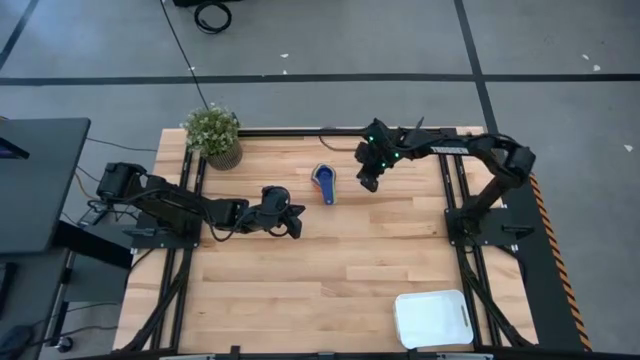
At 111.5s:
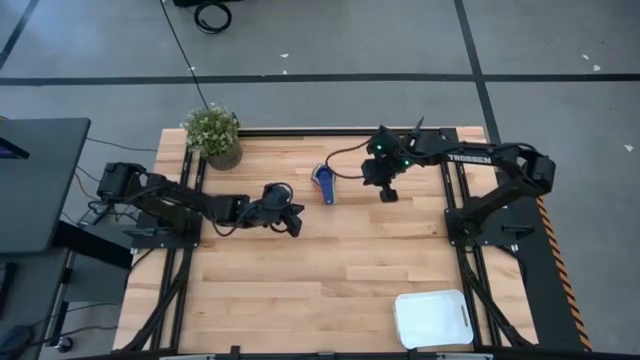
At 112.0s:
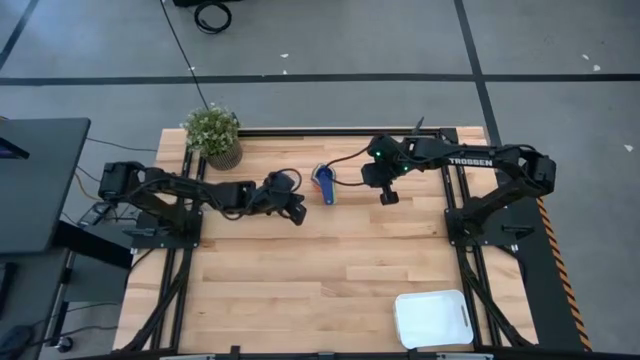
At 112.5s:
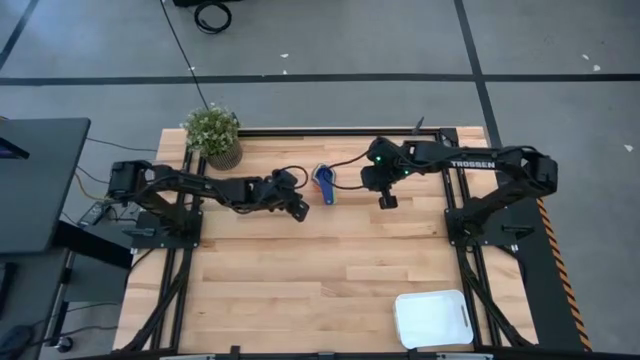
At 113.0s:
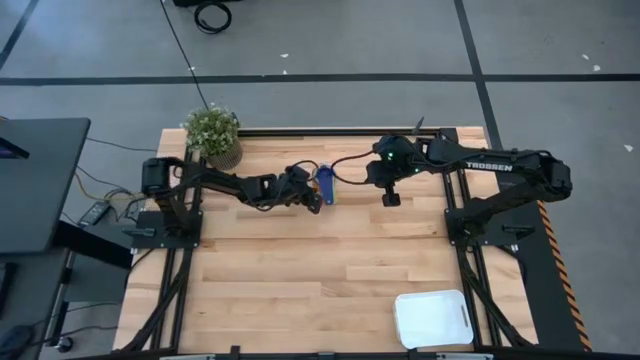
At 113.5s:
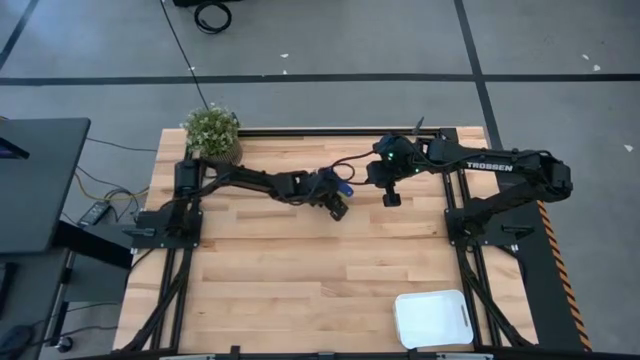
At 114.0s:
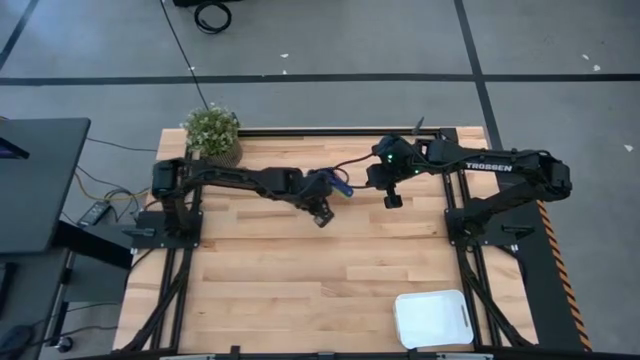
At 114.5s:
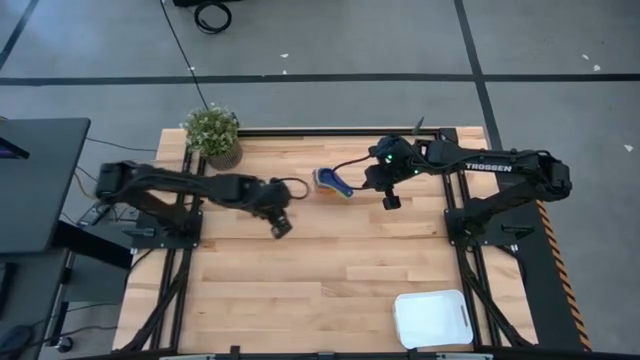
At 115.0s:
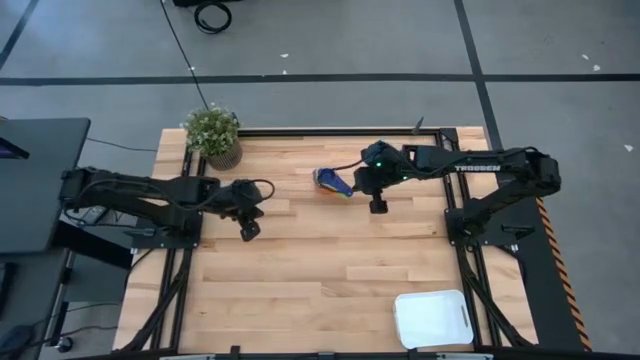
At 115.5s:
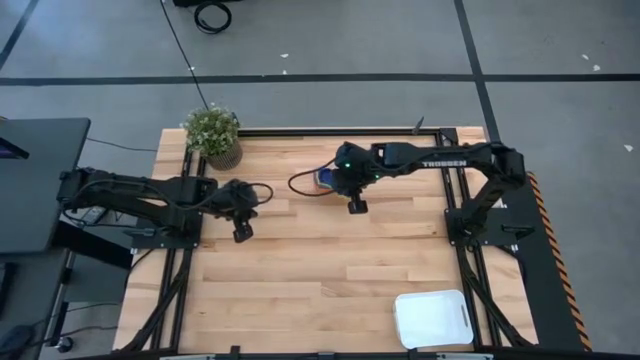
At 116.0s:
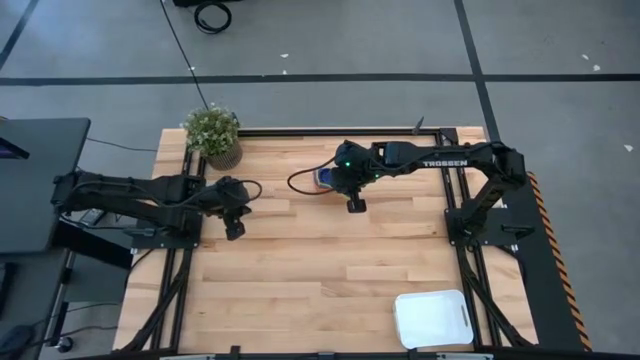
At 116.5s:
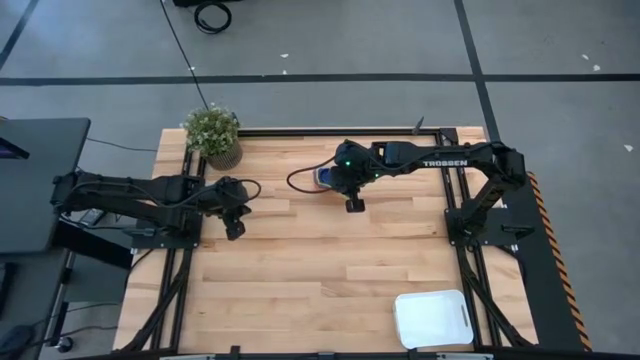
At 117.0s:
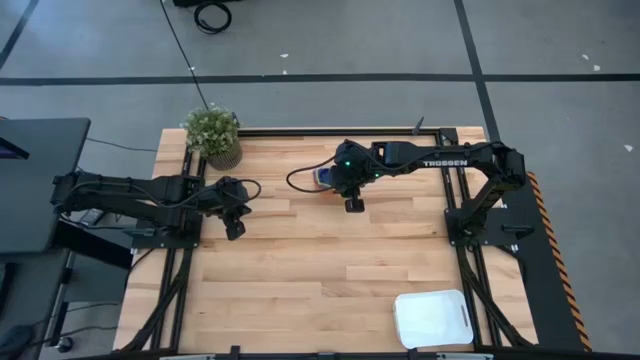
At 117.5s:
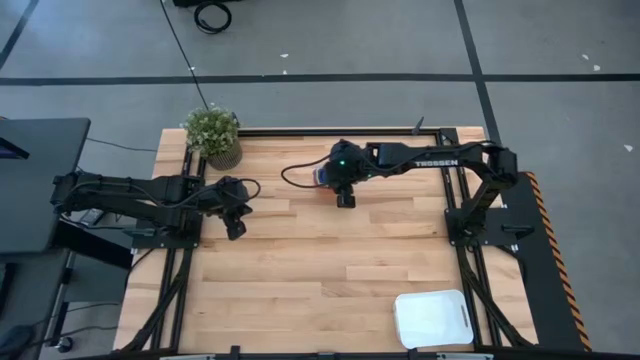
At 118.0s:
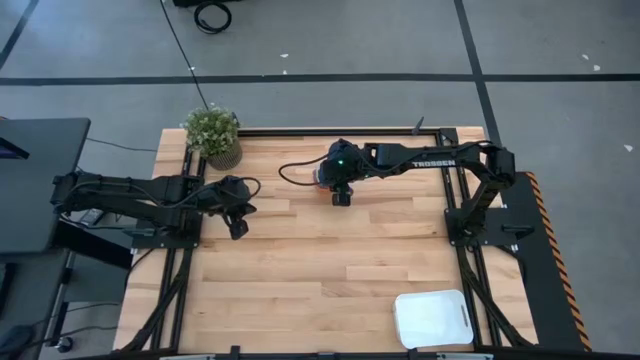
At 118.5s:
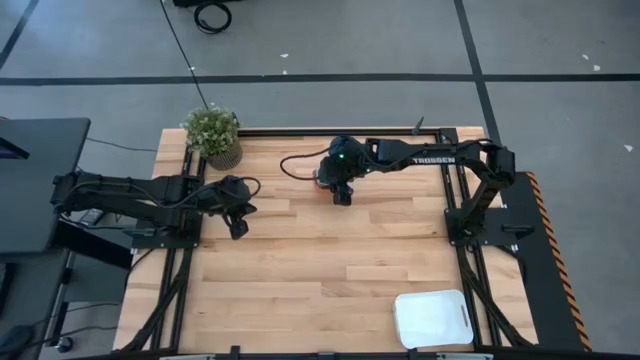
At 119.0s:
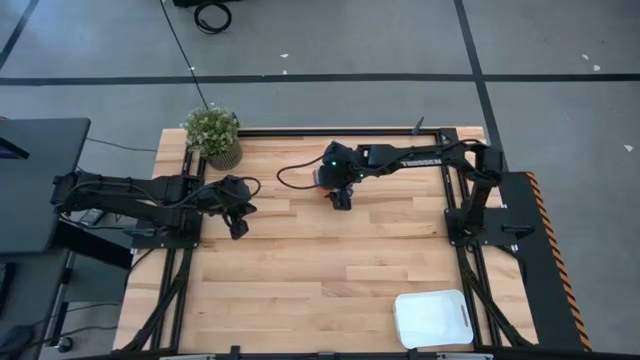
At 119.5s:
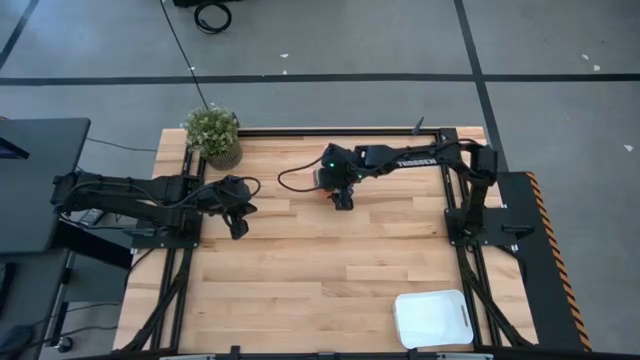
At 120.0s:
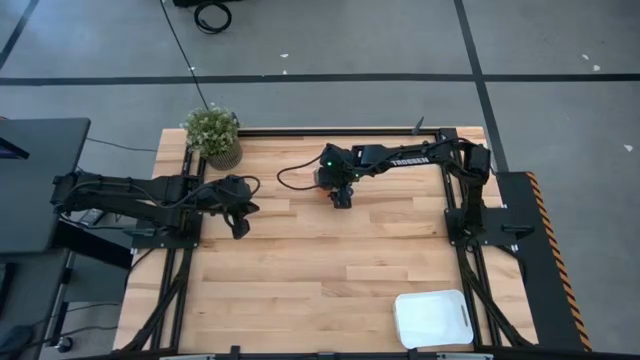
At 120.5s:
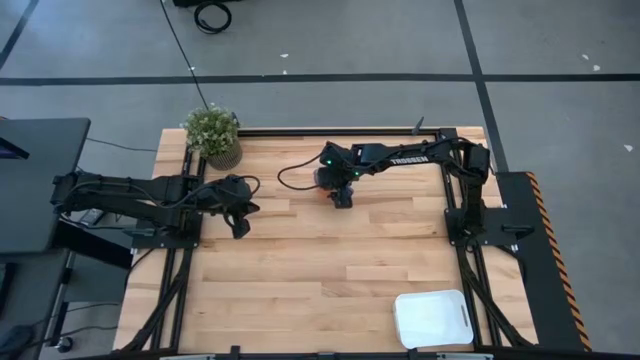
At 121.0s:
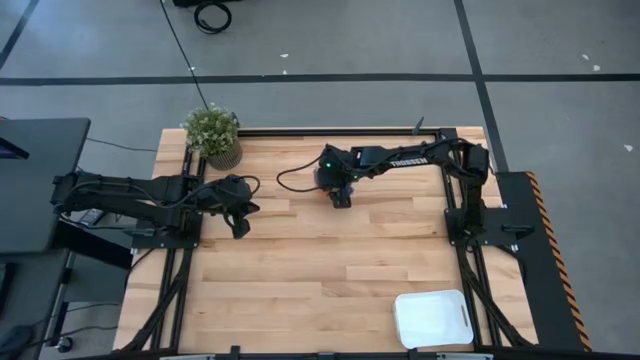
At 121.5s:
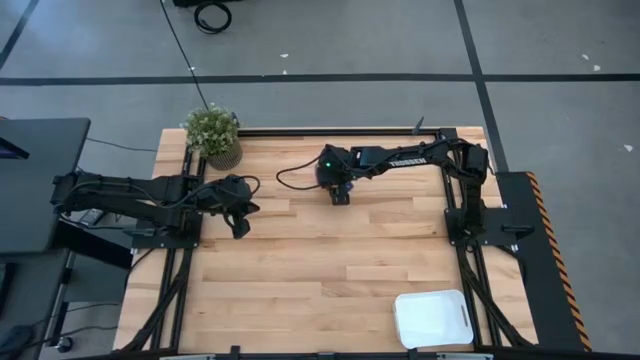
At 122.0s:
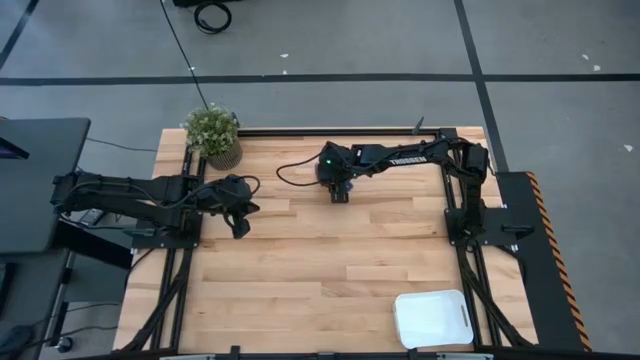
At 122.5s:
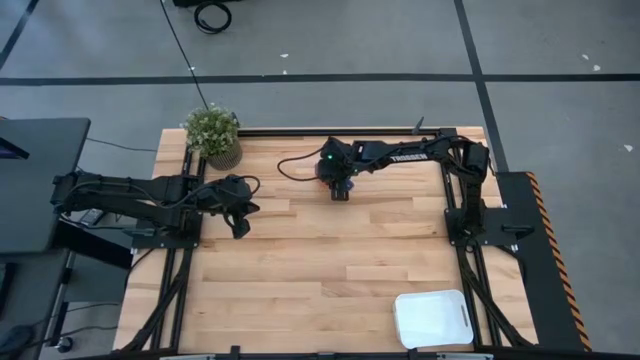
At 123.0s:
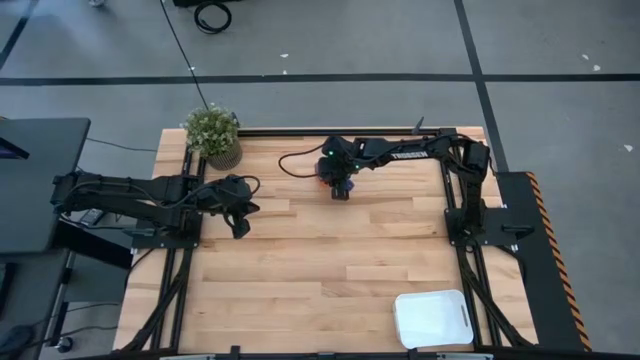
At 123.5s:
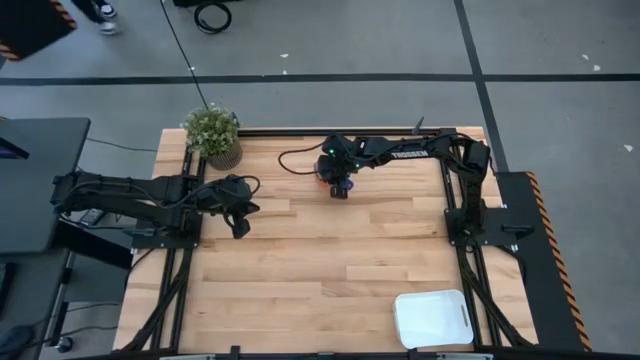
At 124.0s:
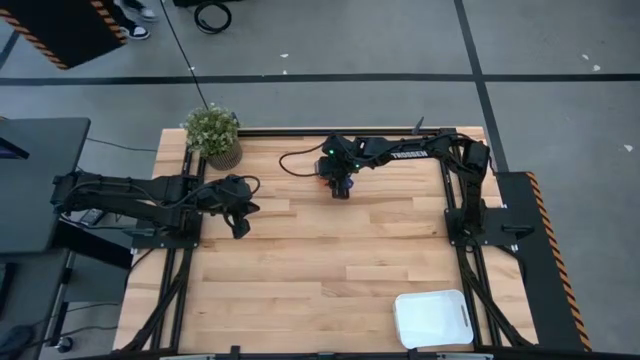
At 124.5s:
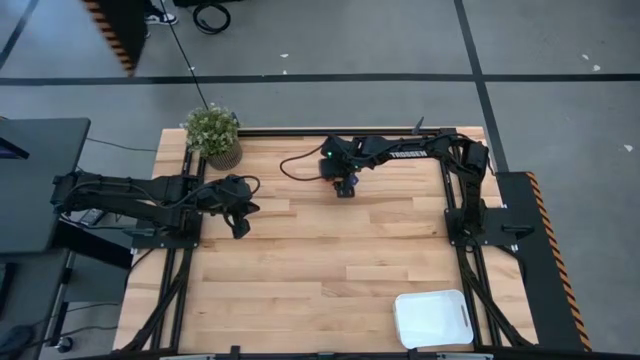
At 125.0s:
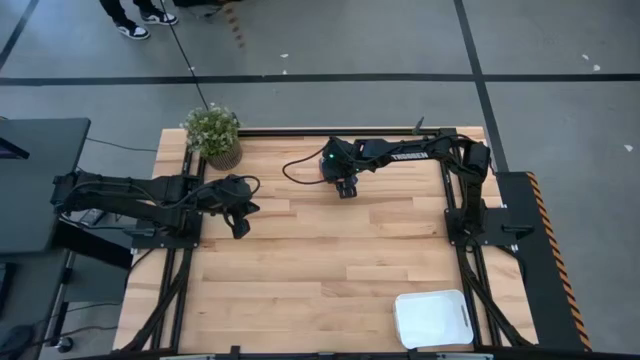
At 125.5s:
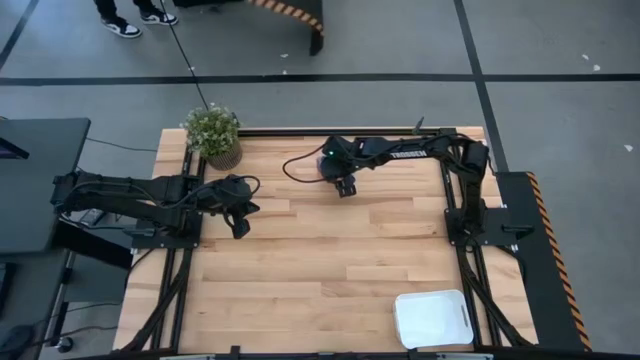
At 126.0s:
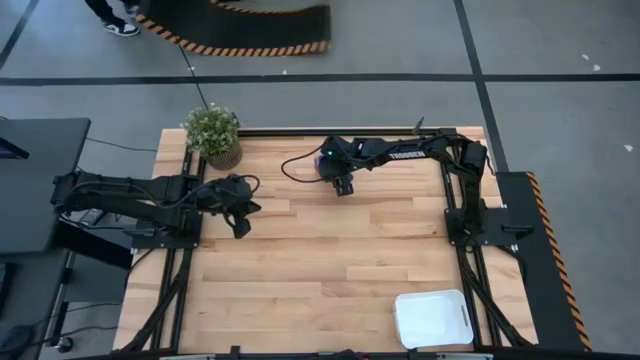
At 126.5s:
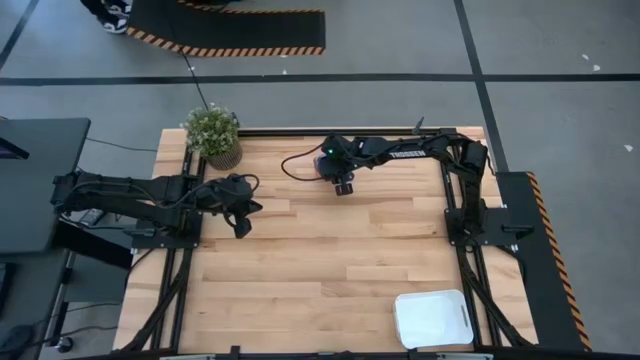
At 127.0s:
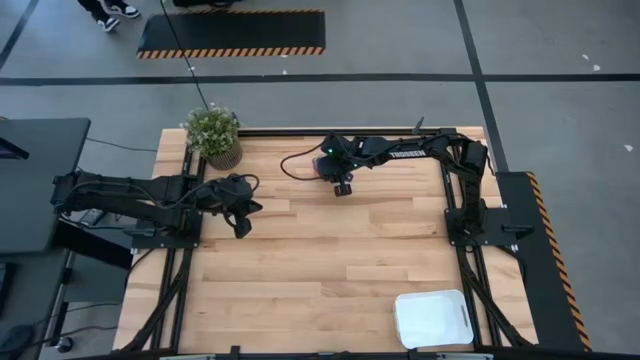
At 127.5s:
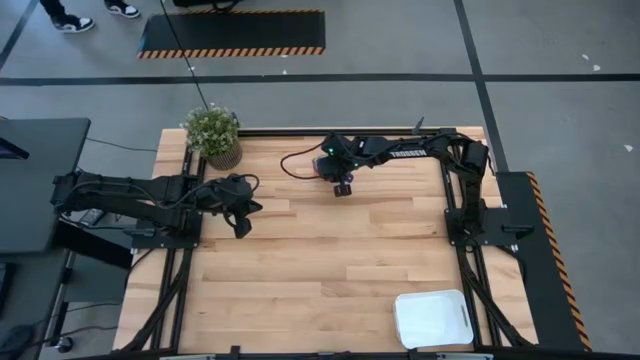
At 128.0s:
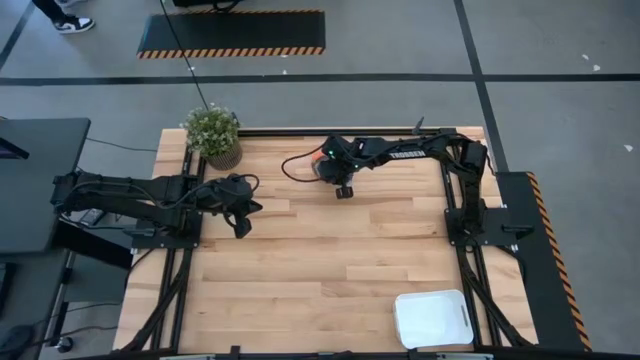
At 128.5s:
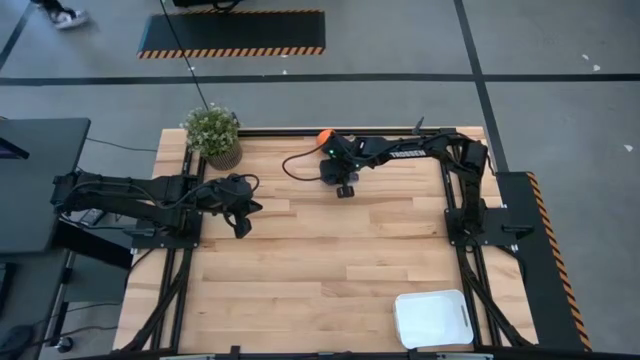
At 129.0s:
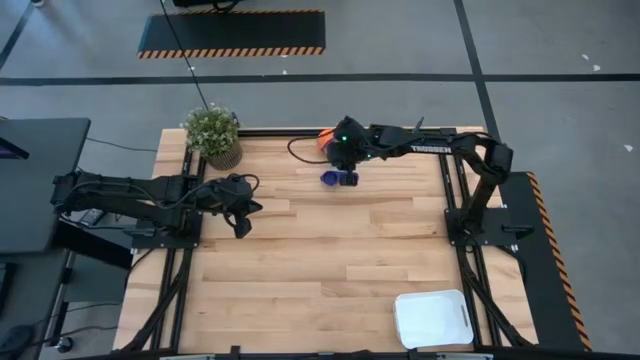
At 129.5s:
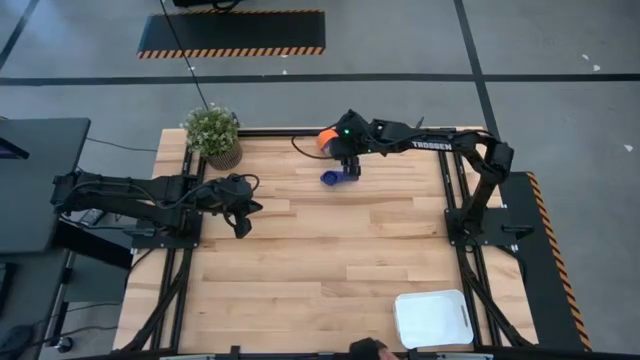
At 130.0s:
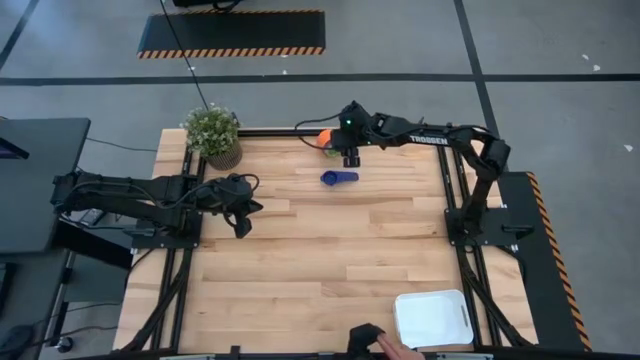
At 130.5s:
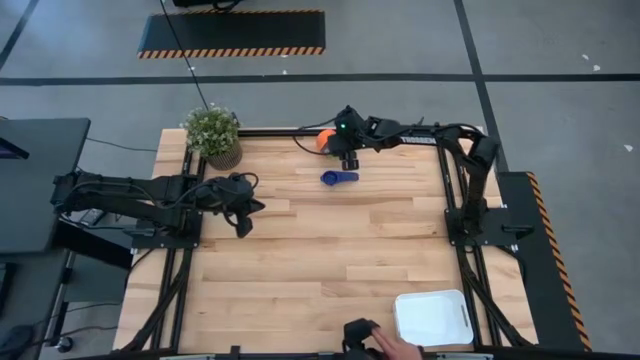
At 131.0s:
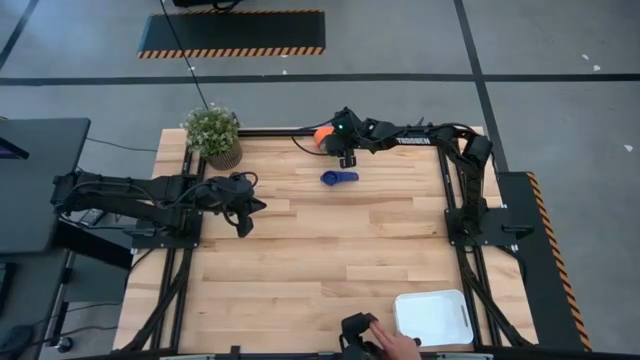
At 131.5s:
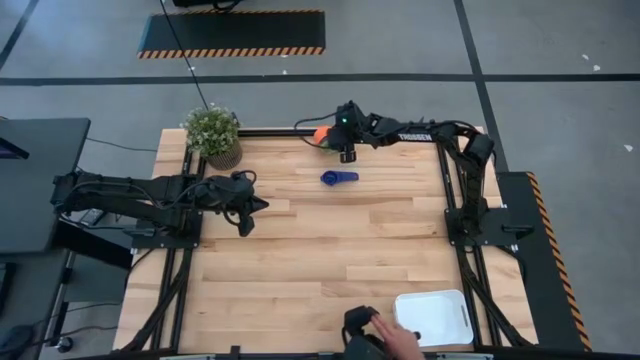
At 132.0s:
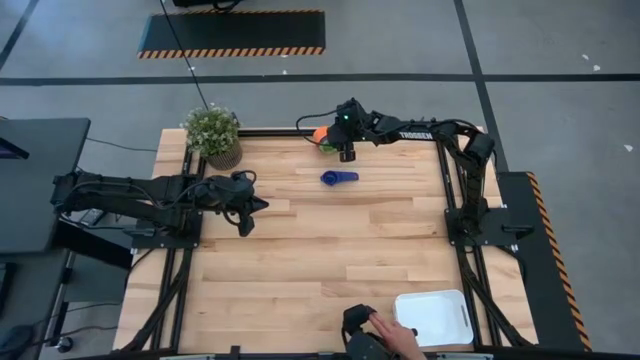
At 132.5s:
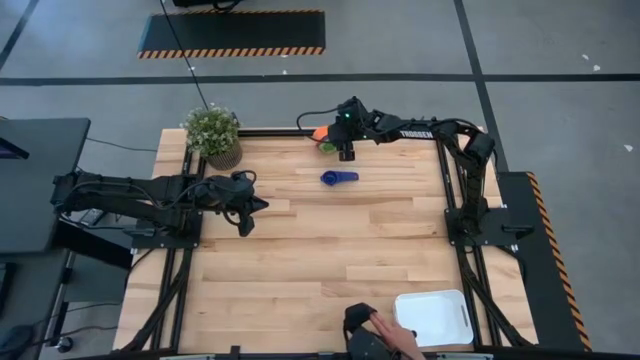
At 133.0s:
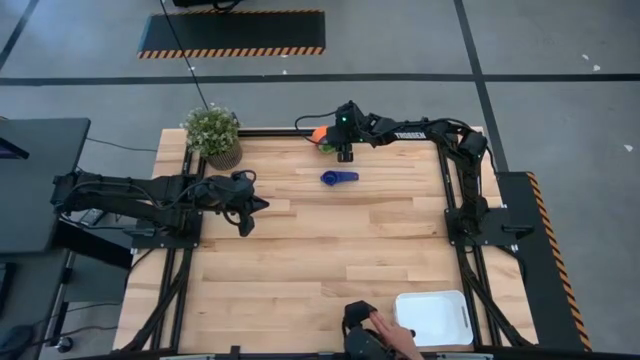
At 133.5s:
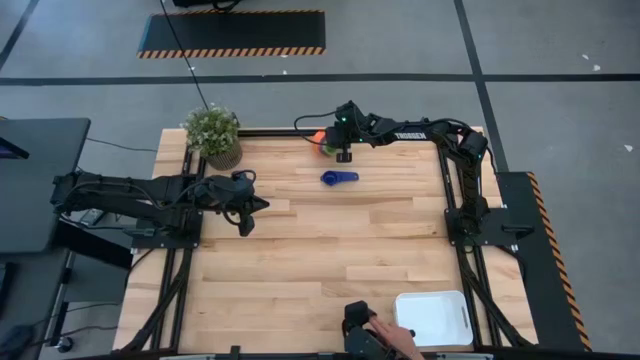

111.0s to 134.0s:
Task: Nest measuring cups in basket
Put the stacked measuring cups into the white bin
